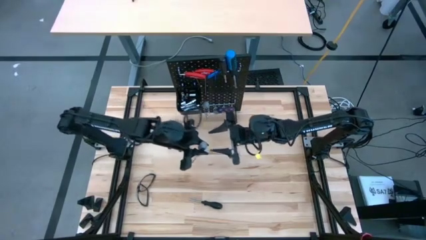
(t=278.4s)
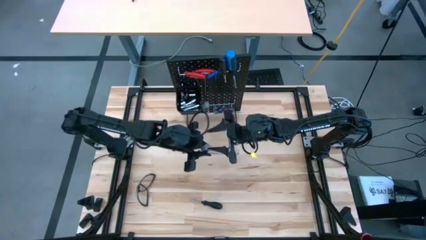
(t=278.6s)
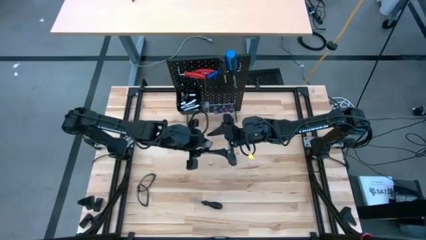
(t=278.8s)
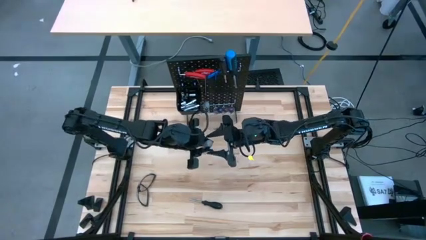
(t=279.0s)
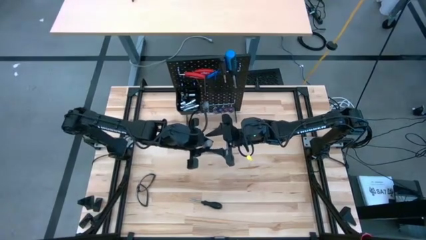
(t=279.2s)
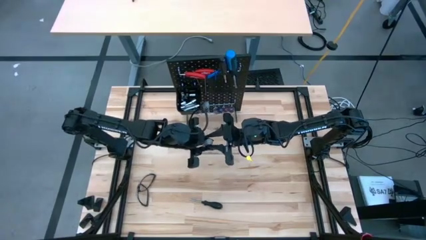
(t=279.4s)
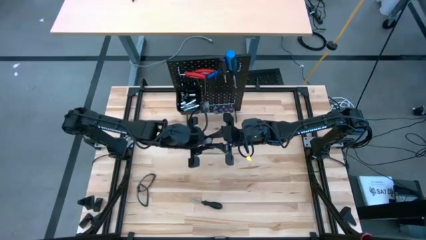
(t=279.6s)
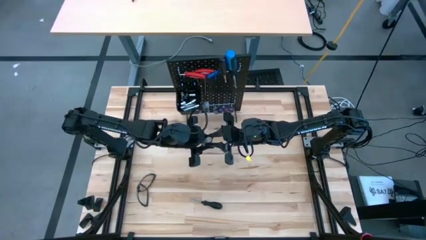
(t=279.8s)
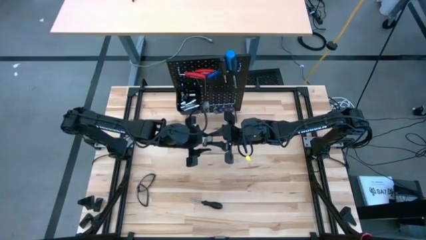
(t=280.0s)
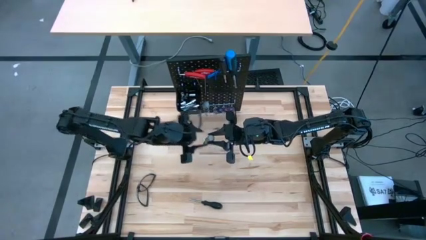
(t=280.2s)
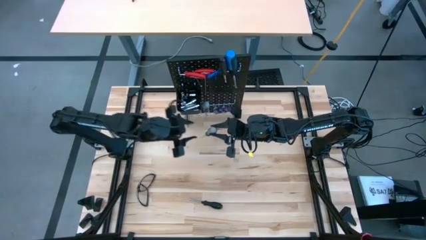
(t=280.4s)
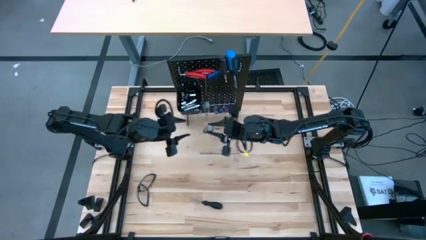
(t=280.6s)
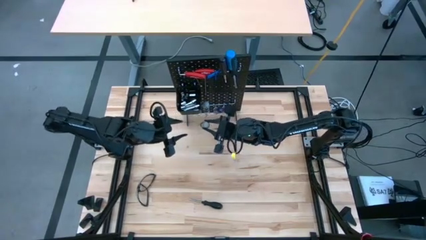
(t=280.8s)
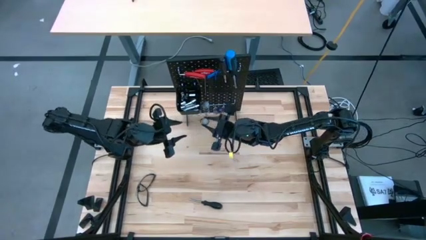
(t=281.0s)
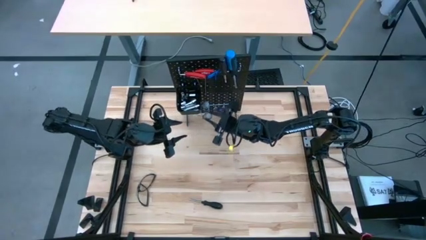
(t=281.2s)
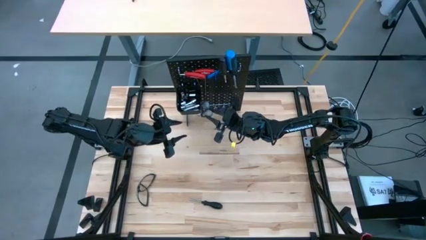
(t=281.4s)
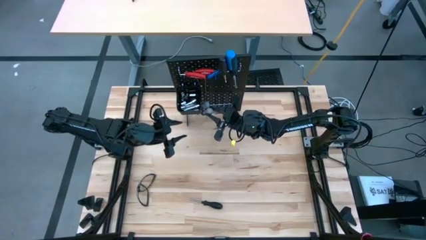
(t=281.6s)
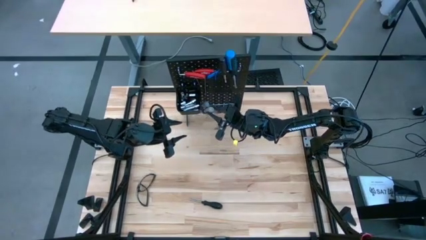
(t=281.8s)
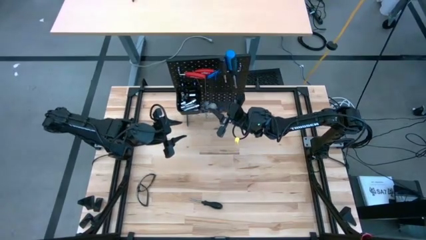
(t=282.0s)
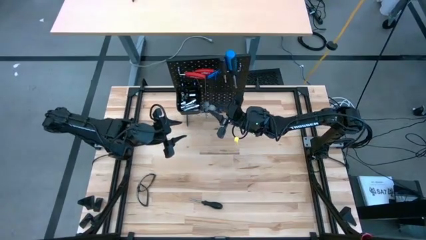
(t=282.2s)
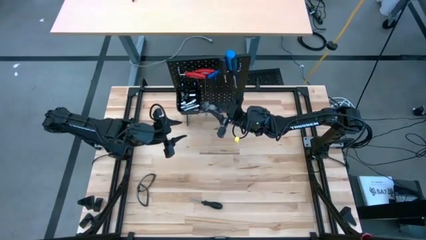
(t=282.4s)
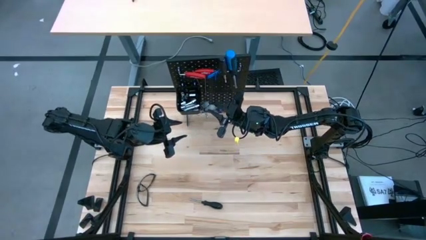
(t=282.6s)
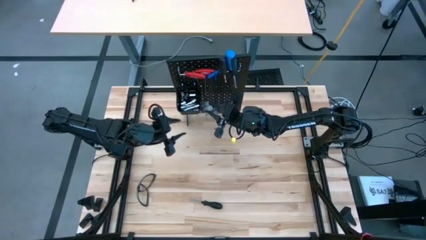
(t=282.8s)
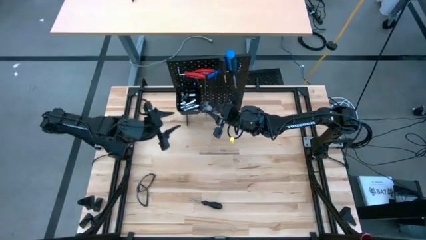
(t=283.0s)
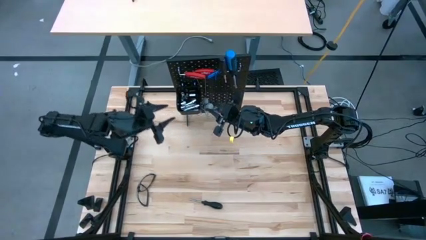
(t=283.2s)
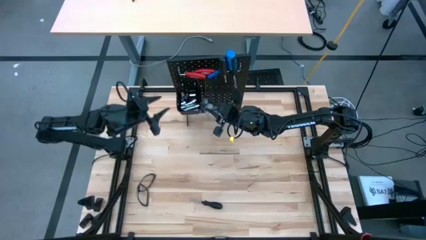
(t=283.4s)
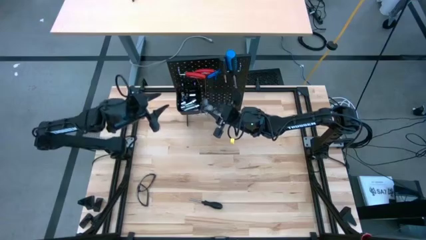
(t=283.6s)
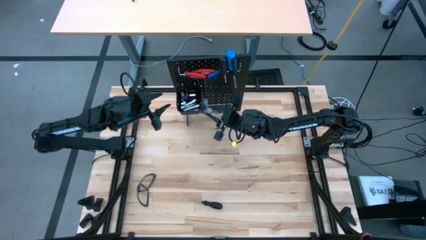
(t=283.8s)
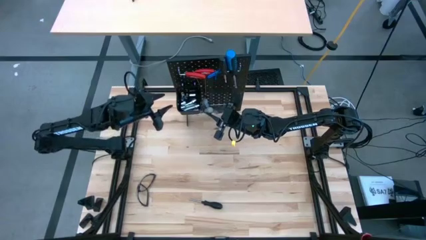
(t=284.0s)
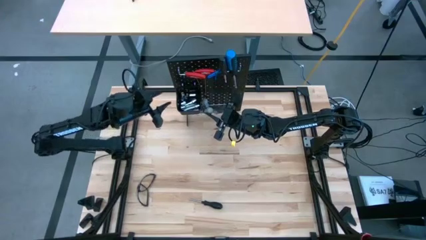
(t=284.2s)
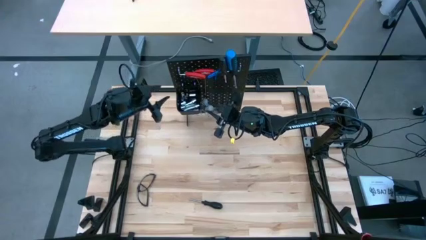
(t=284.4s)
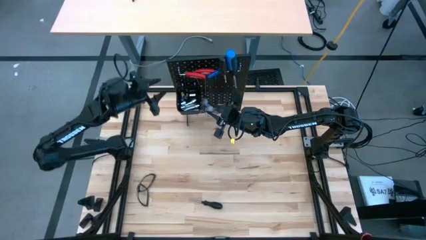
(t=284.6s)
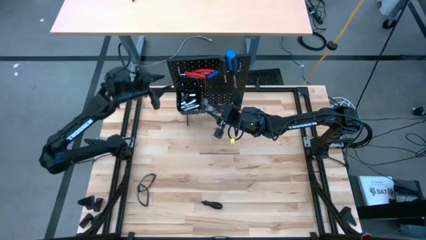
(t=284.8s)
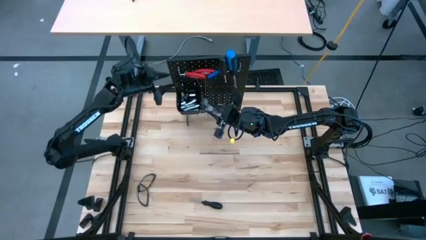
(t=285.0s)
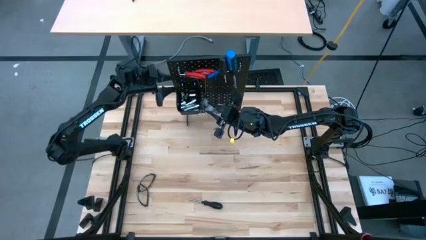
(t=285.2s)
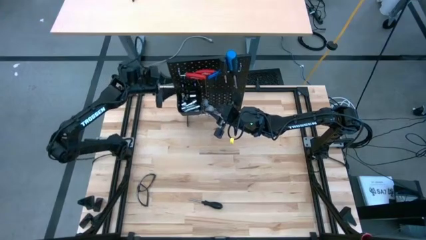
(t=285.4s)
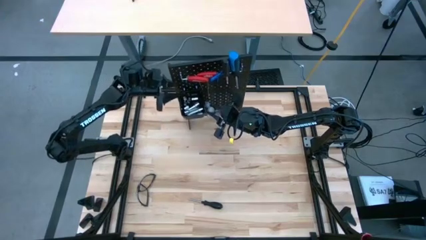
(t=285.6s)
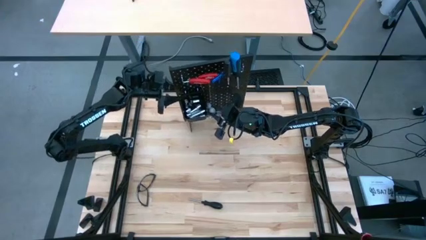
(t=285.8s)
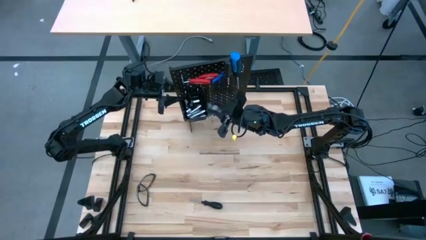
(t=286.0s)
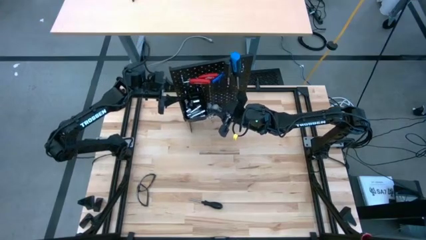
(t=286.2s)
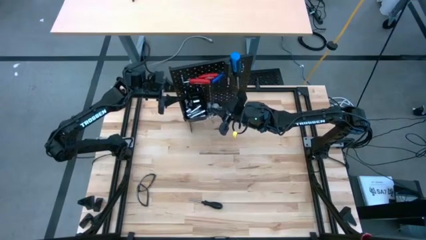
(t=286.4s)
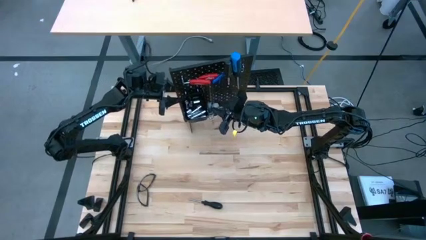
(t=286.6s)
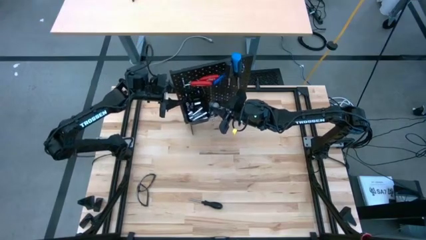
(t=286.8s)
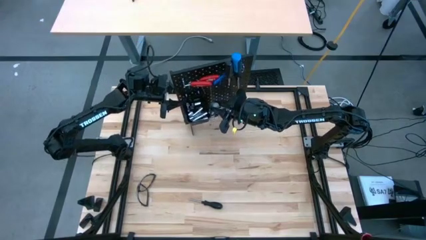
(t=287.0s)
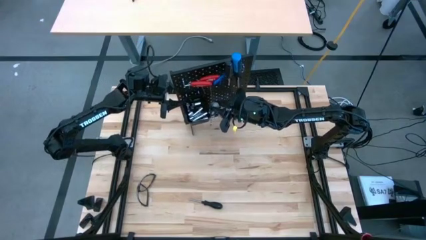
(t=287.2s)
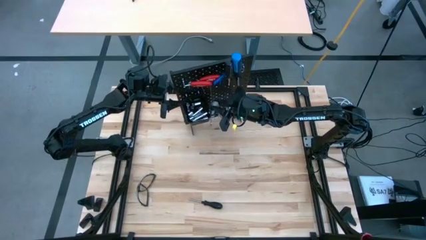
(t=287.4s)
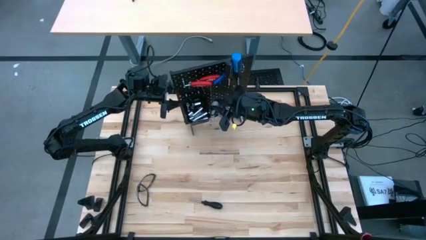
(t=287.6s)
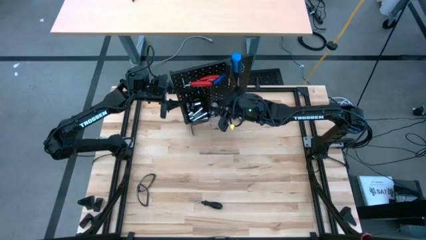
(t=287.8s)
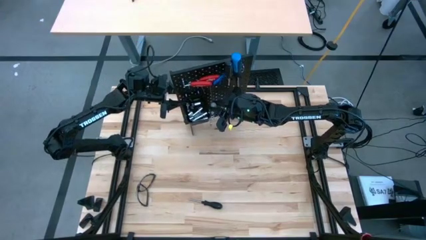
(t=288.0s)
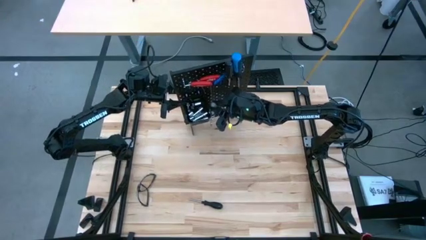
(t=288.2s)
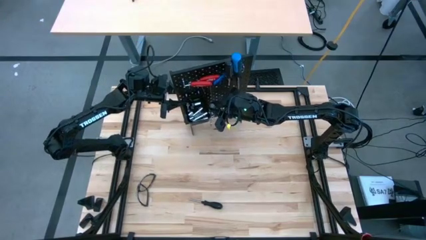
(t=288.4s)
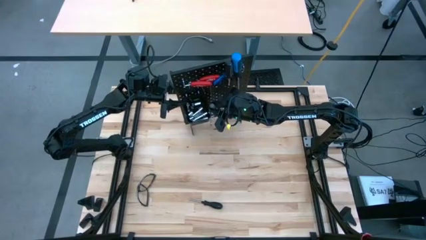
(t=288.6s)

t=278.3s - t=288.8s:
Task: Hang tools onto peg board
Hang the gray screwdriver on the pegboard

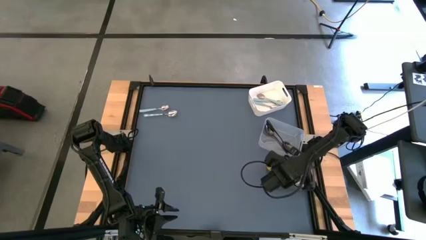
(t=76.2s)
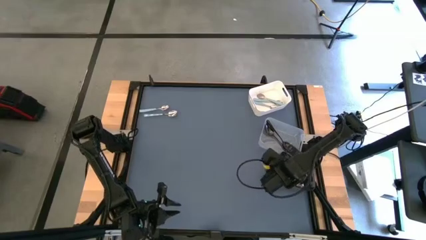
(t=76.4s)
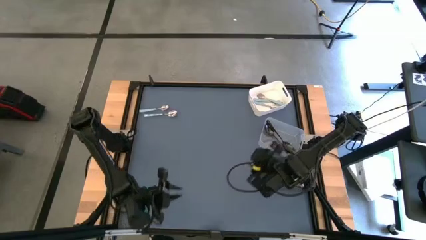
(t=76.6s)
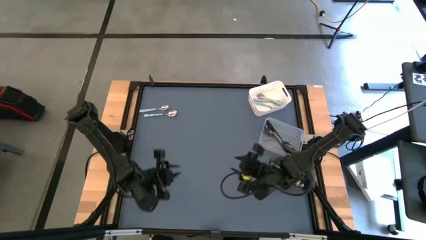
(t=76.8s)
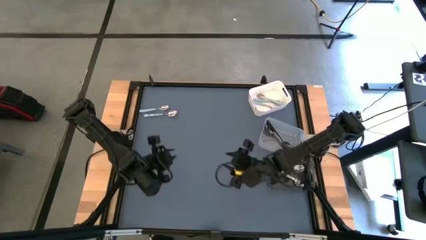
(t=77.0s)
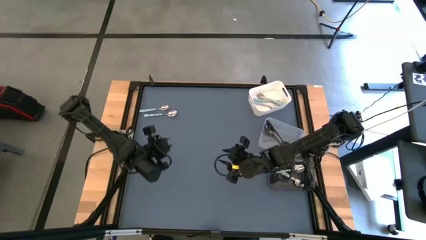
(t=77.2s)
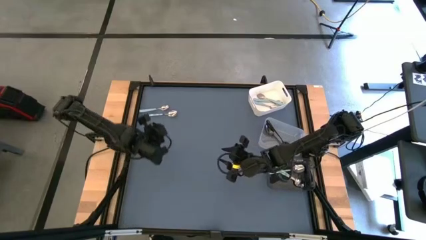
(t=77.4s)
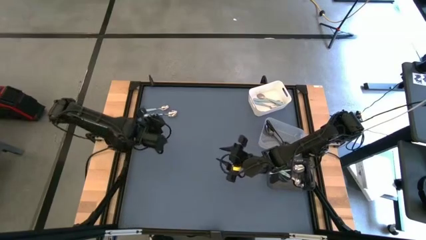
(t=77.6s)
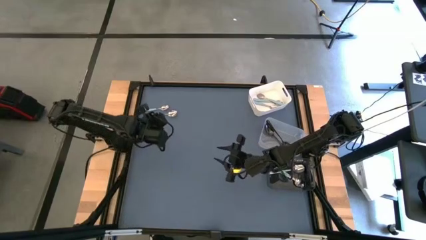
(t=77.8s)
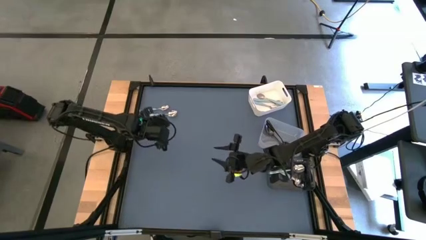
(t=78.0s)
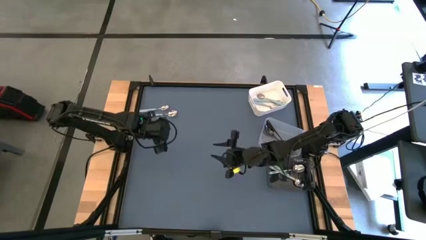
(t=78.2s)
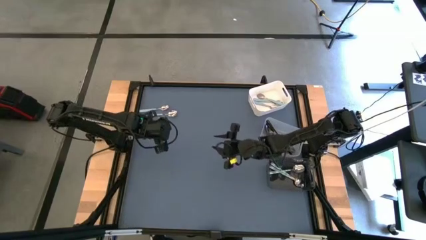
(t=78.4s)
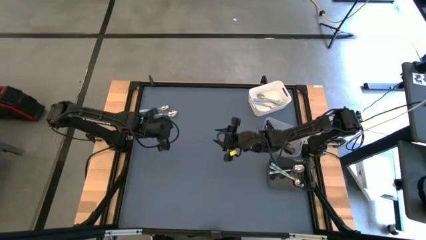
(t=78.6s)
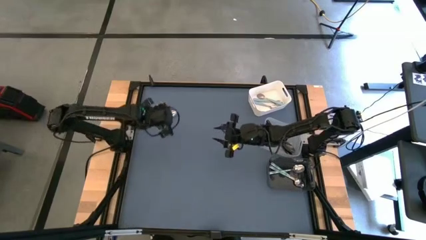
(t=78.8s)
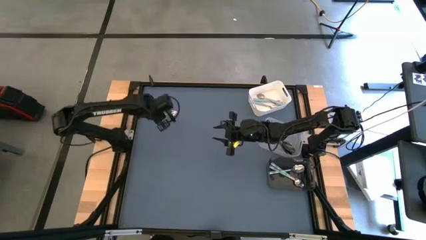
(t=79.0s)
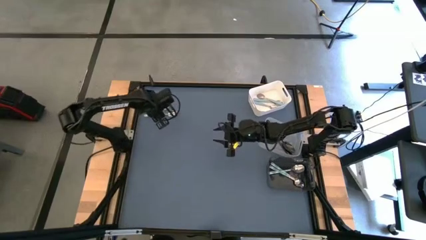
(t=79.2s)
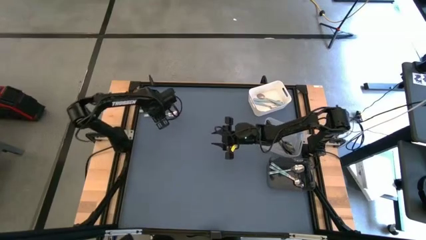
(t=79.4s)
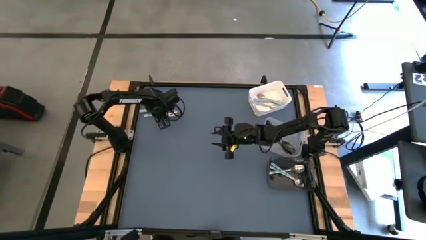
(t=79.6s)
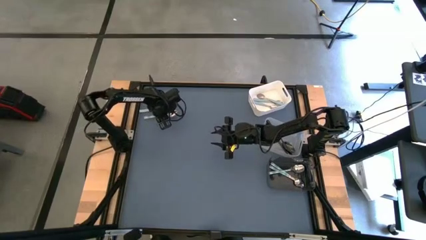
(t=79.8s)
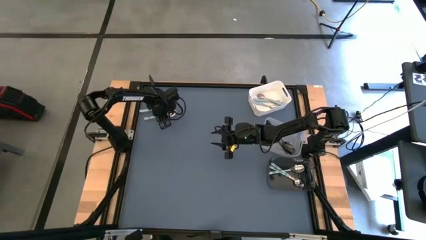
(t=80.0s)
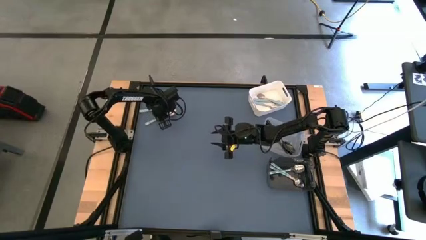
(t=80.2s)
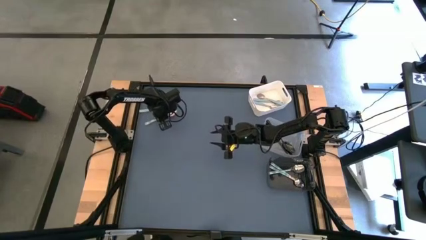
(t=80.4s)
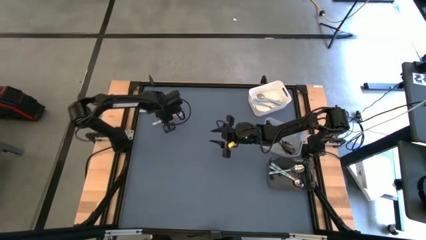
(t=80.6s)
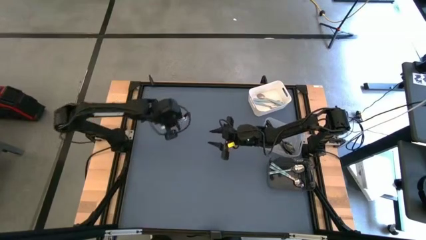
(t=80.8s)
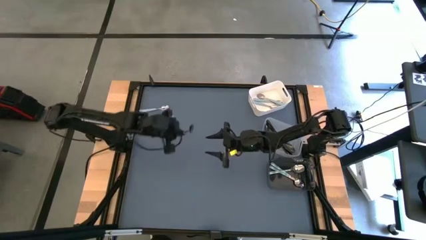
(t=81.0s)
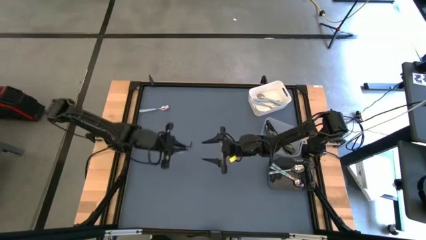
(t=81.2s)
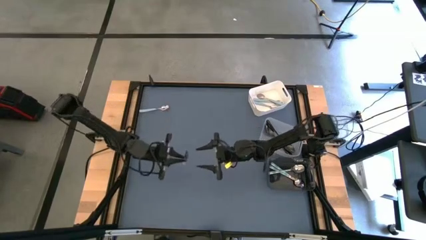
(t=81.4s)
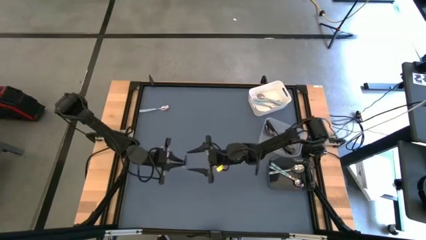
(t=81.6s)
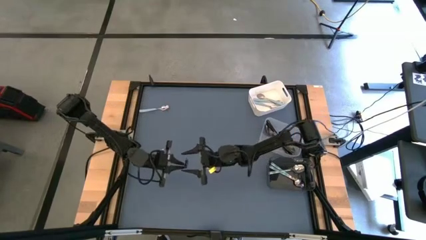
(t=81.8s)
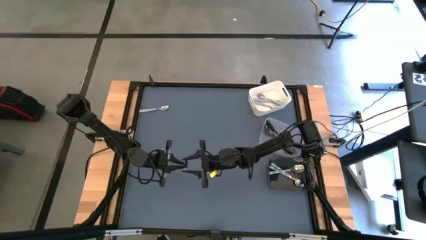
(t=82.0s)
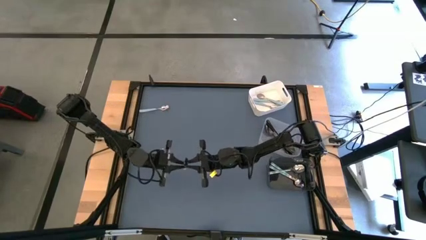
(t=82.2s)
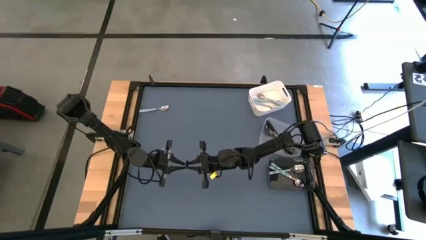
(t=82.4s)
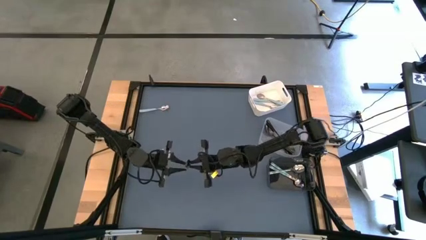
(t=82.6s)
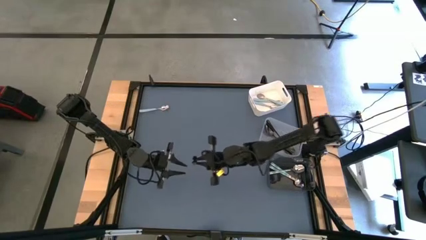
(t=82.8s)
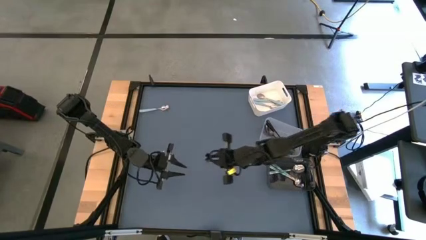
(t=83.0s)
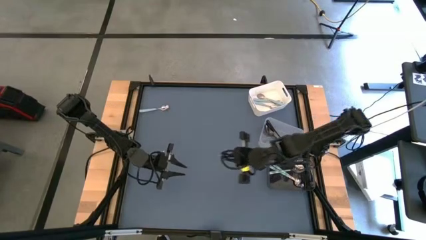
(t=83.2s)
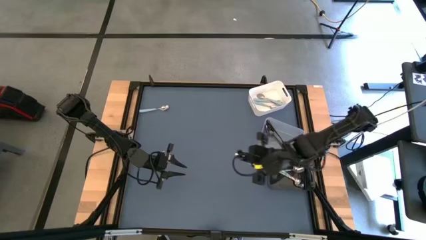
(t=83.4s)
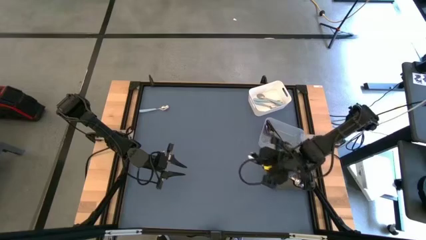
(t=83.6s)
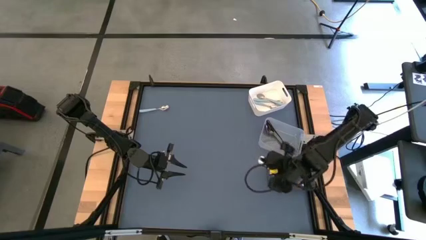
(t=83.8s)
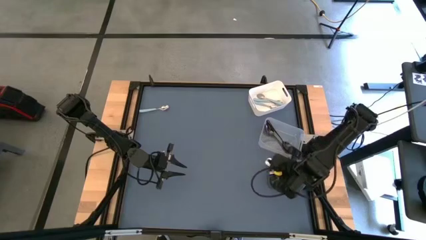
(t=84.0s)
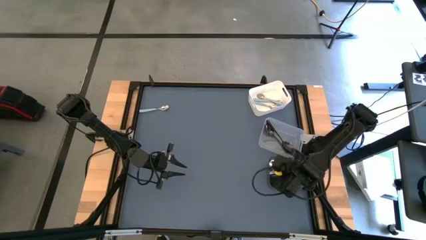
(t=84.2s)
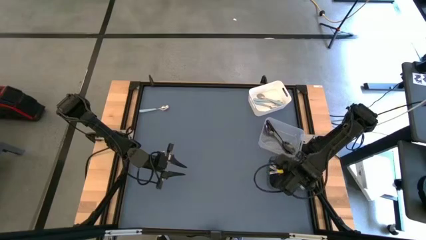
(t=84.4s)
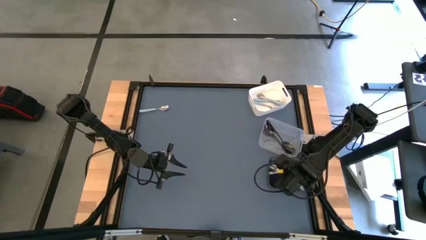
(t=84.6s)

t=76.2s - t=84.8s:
Task: Sort silverware by color (type)
Put the white and blue spoon into the black bin
